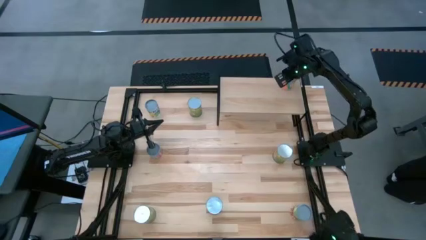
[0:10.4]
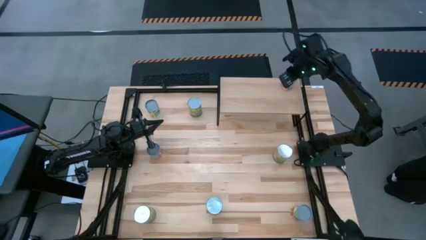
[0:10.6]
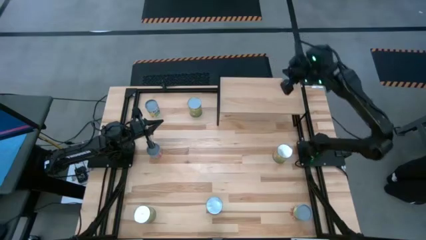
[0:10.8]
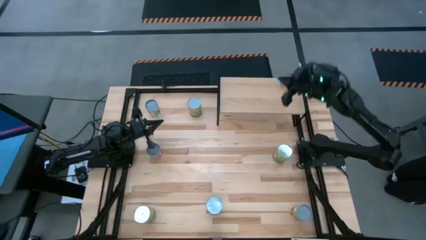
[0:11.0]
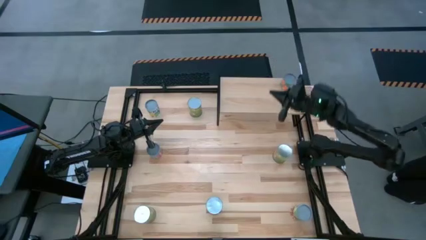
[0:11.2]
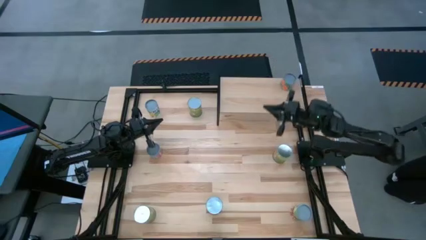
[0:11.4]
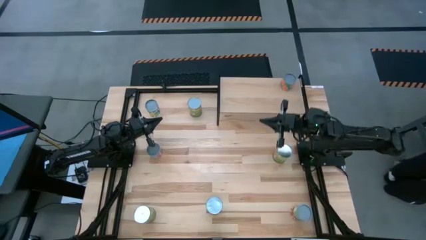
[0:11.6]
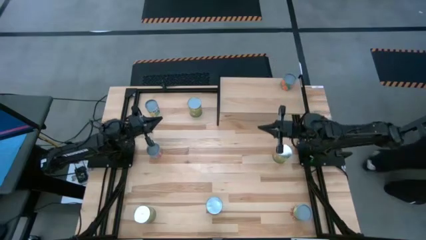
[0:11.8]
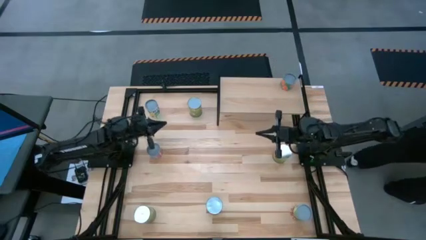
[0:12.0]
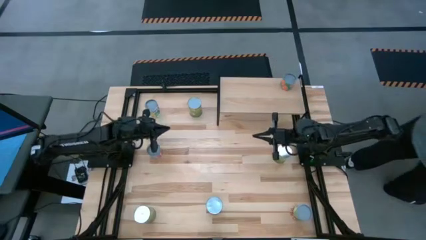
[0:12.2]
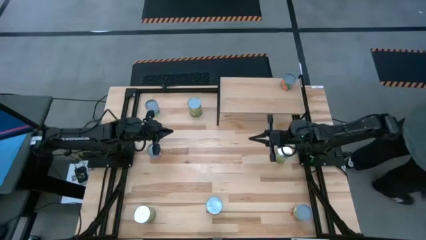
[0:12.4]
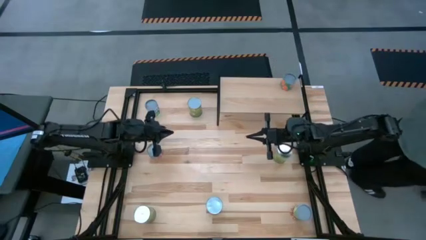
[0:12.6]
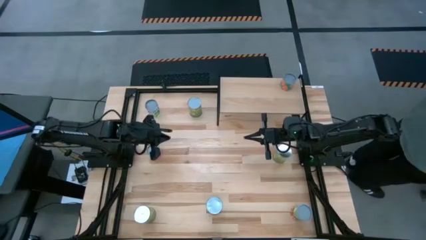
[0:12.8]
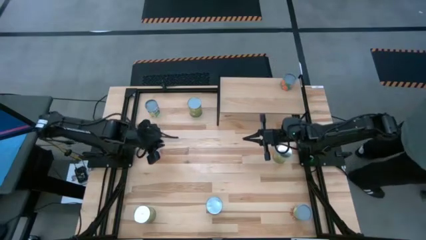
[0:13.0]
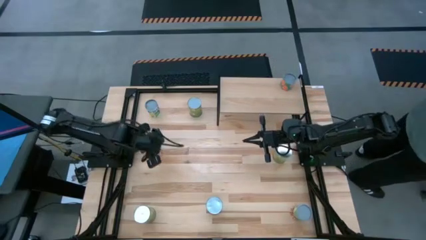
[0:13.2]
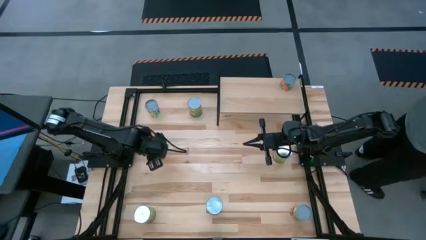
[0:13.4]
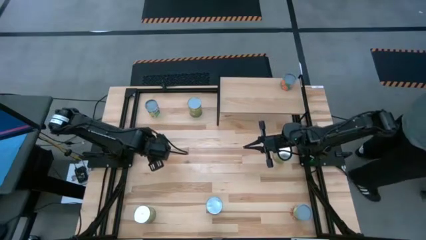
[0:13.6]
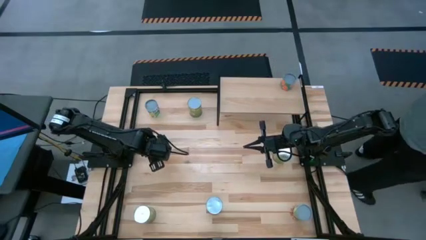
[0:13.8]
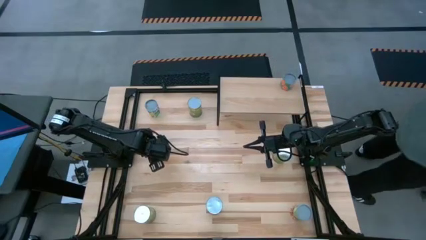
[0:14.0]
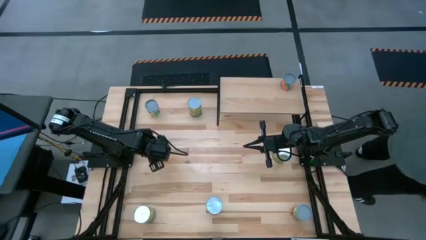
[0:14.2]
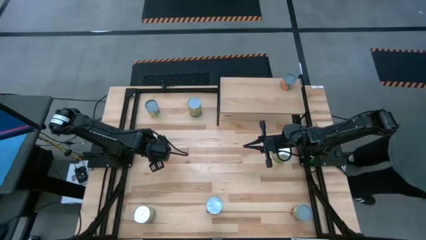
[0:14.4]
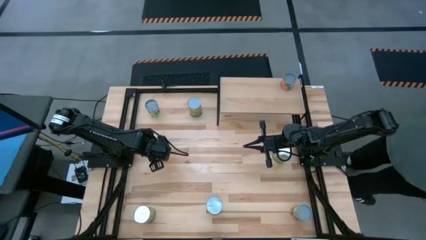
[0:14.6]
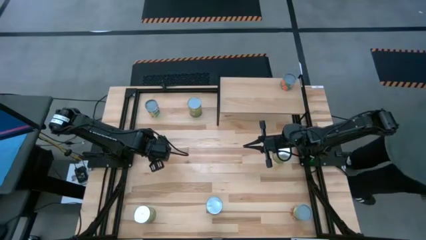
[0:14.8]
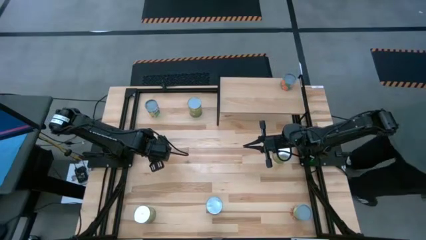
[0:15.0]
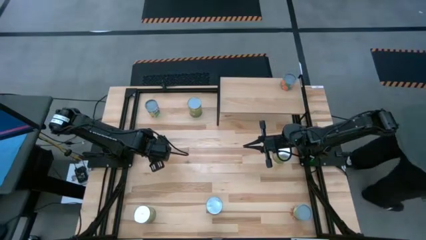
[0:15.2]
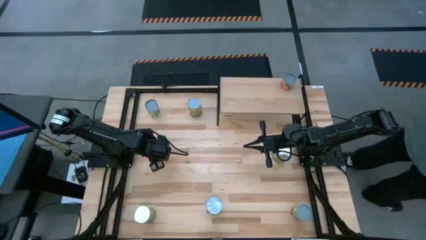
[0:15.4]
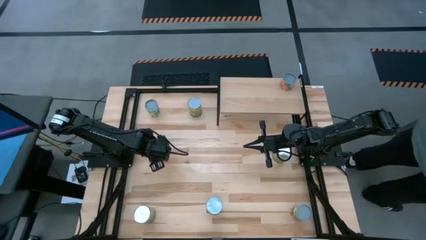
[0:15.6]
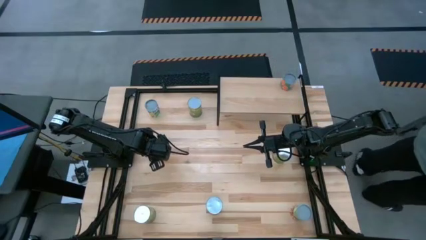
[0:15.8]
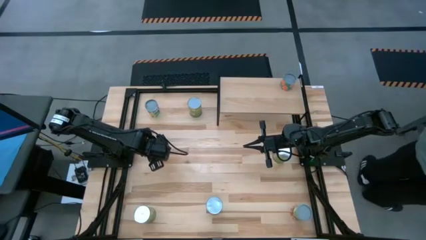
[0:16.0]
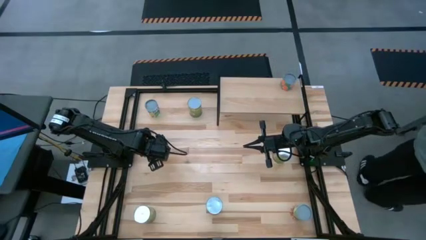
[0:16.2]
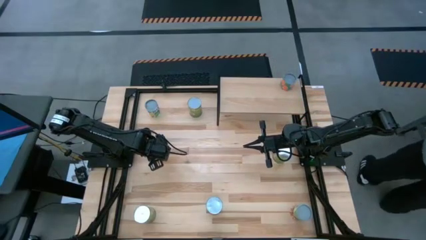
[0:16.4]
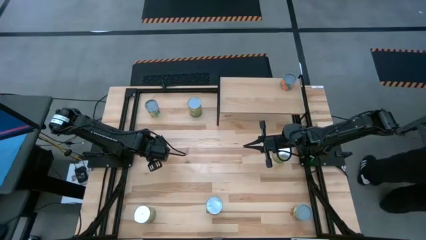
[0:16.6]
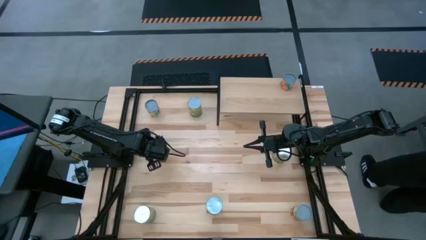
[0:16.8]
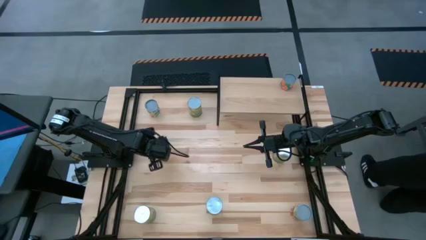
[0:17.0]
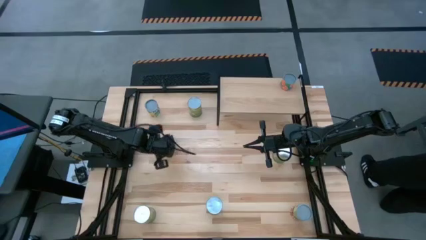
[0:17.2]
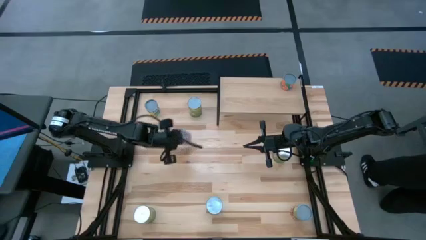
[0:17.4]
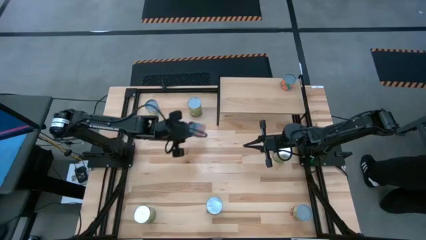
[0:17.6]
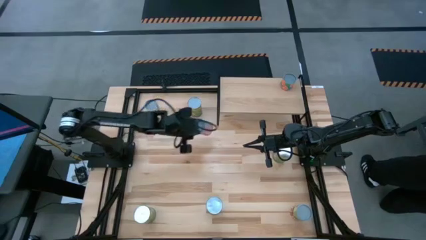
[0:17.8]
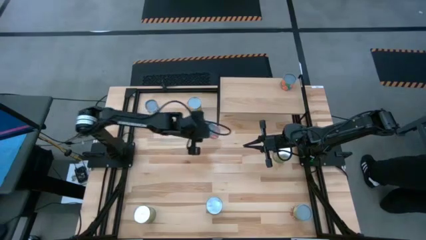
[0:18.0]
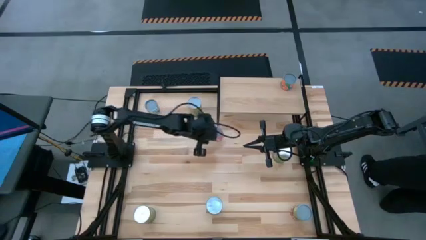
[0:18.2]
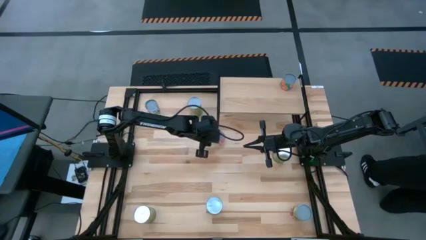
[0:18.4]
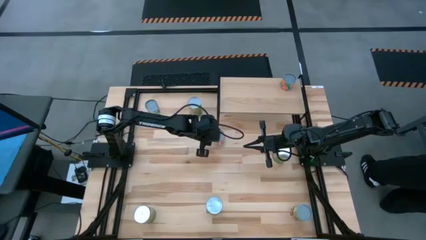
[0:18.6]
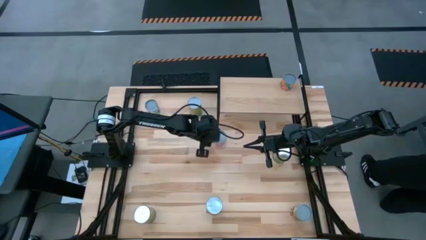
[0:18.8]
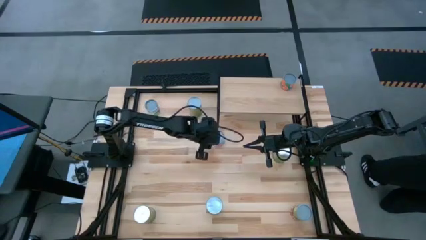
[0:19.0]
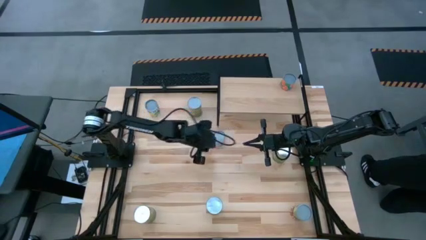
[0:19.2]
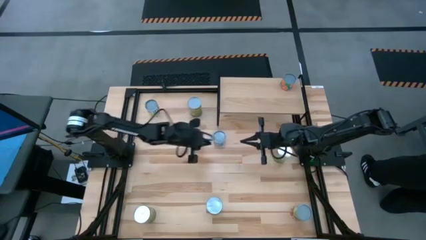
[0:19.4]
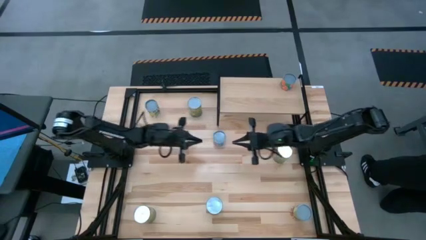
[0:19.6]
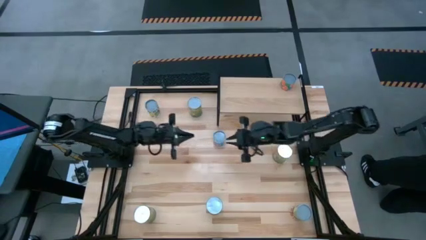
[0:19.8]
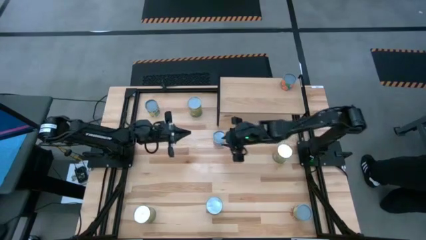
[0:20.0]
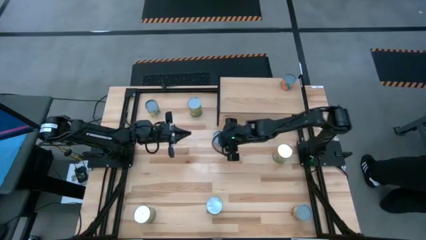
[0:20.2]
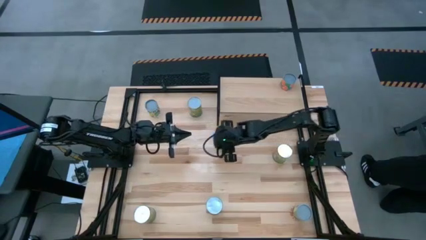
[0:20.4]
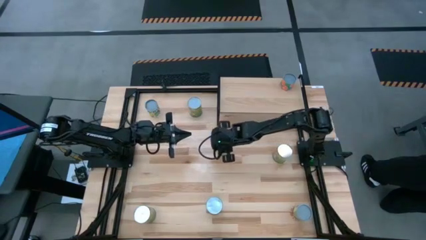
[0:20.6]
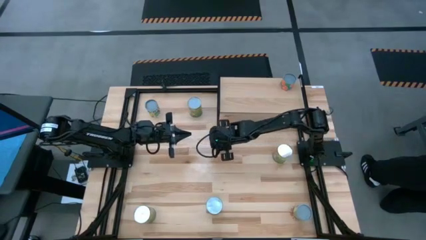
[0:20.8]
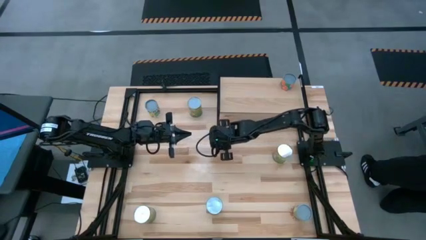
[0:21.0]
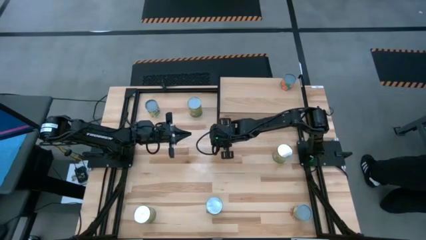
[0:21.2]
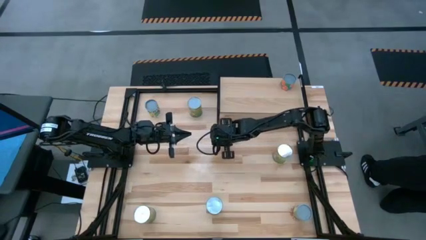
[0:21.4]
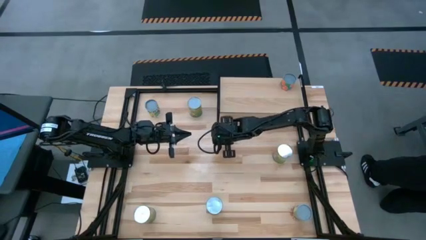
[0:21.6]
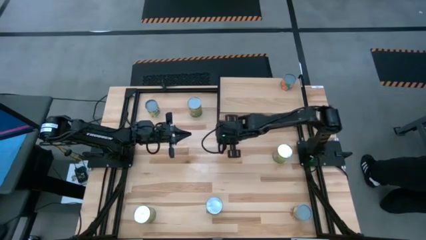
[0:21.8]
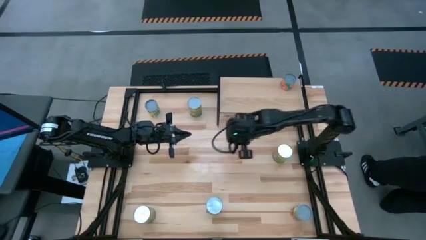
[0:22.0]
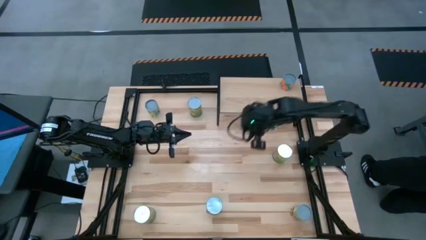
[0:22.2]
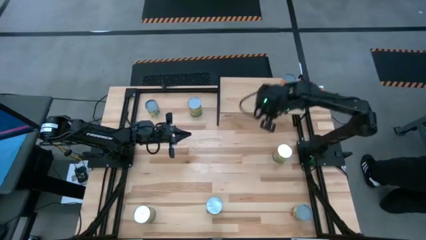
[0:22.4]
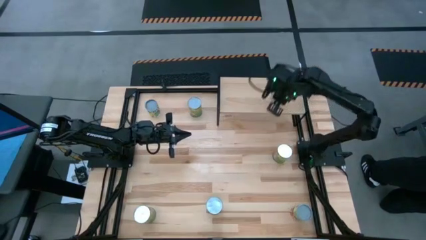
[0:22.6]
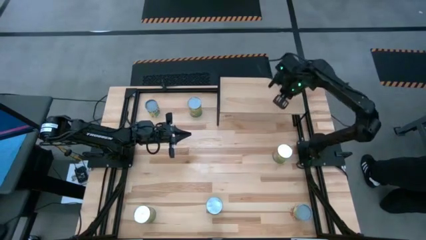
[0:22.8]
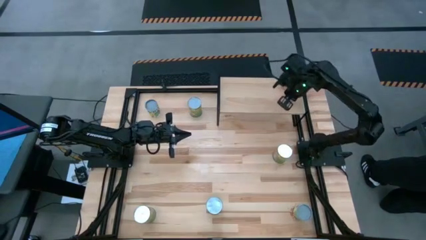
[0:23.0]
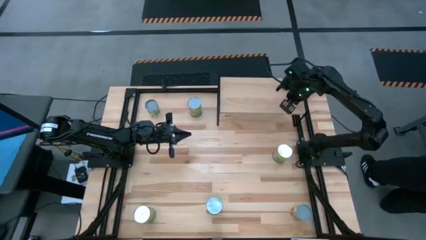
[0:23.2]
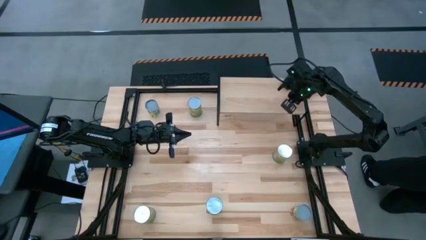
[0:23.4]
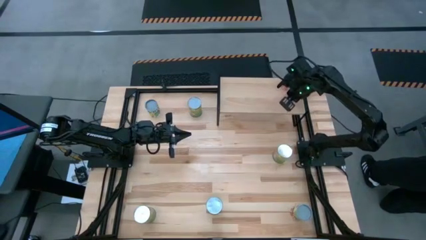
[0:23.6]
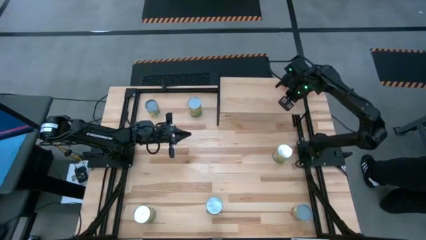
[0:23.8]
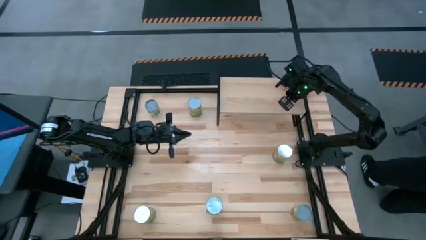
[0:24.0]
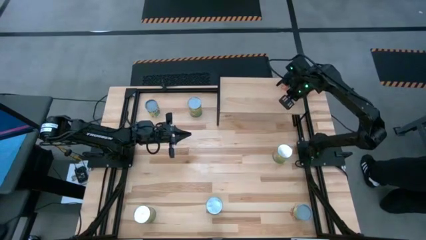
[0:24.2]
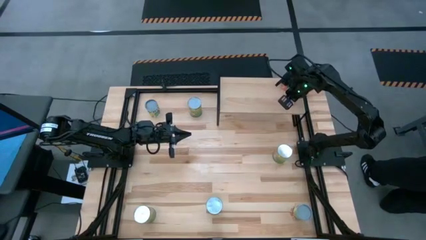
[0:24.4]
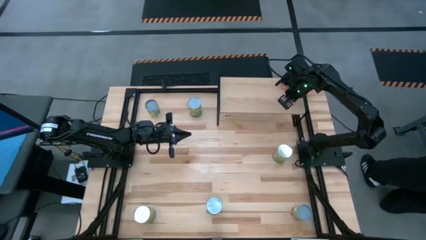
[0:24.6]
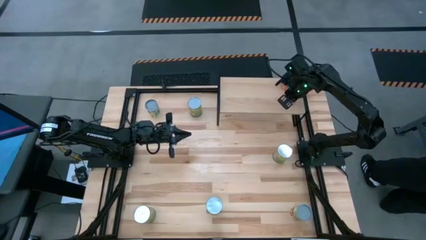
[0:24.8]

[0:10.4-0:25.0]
Task: Pick and place cans onto a shelf
Put the small canned corn on the shelf aligned with the small canned orange
